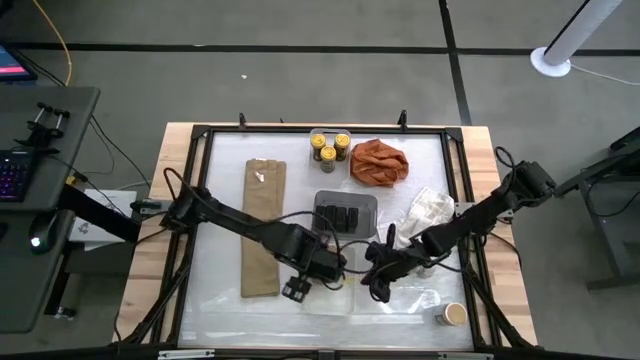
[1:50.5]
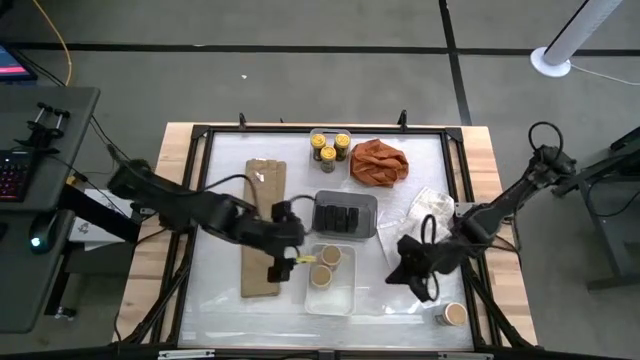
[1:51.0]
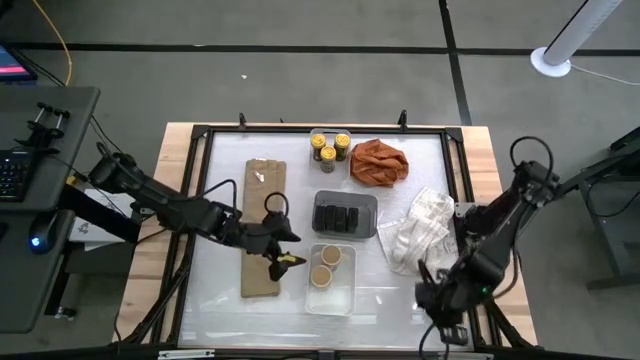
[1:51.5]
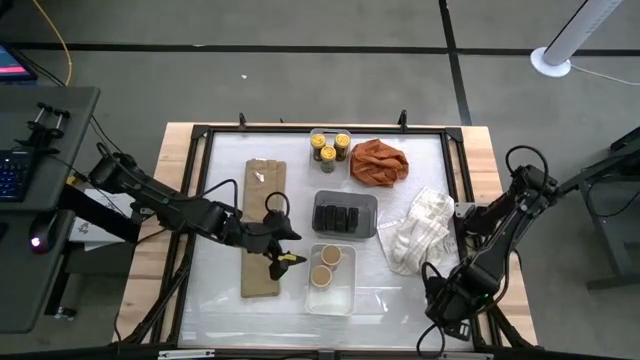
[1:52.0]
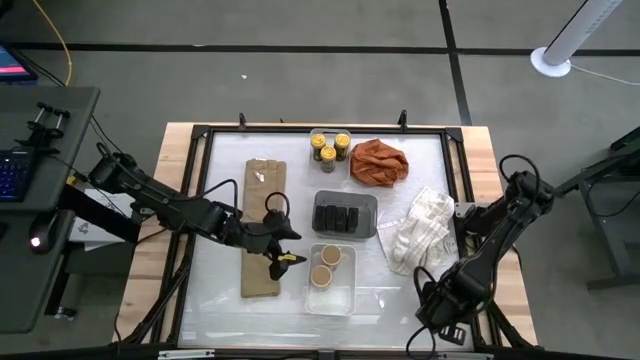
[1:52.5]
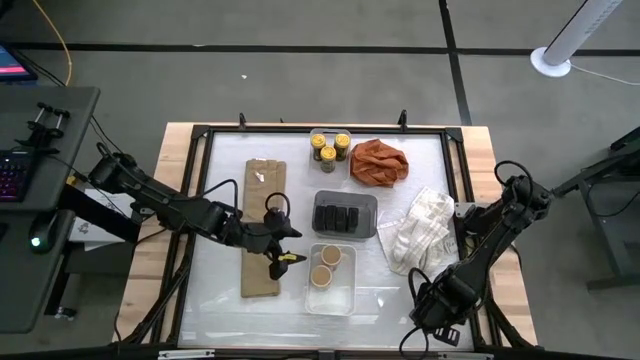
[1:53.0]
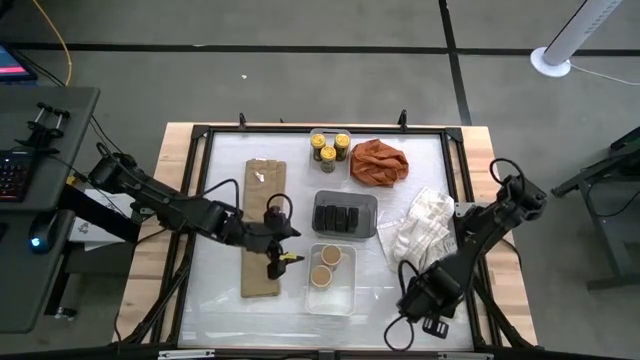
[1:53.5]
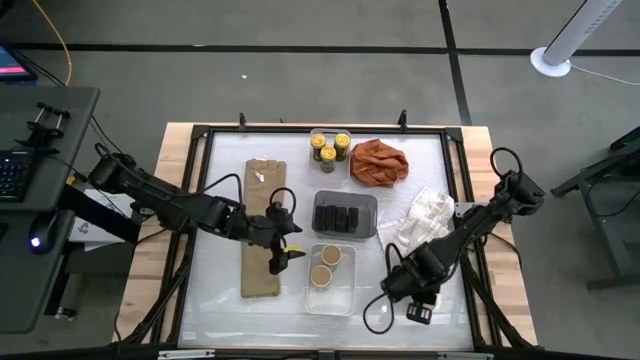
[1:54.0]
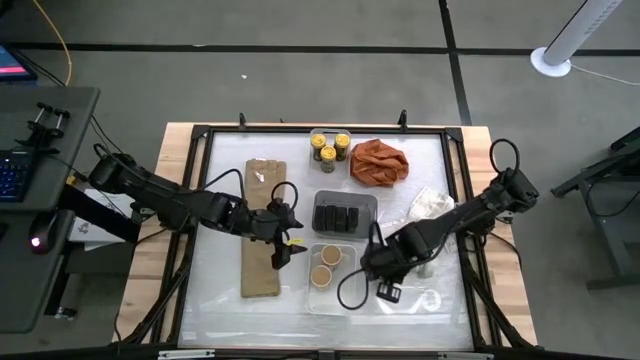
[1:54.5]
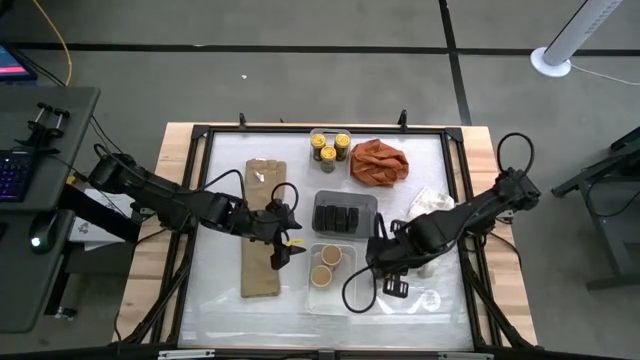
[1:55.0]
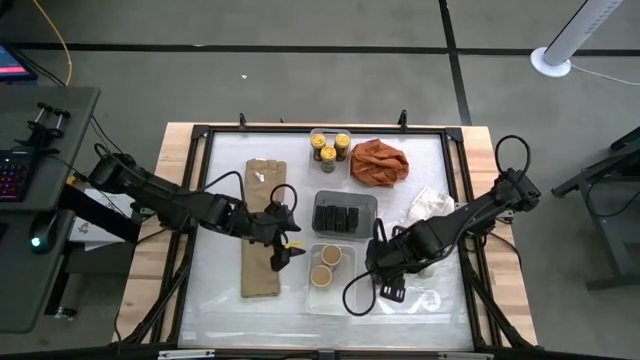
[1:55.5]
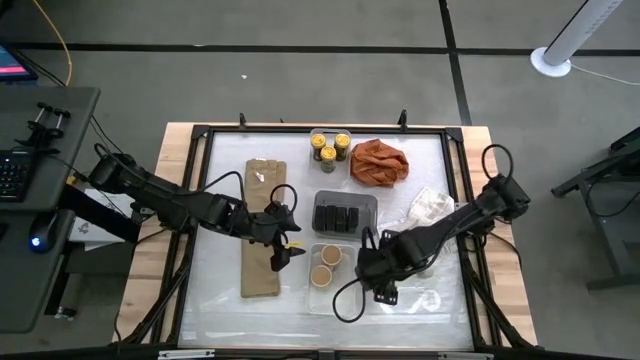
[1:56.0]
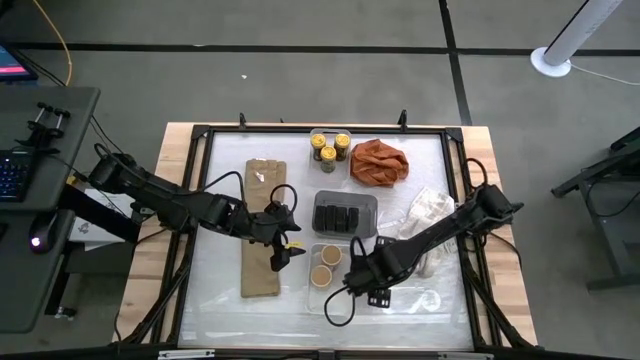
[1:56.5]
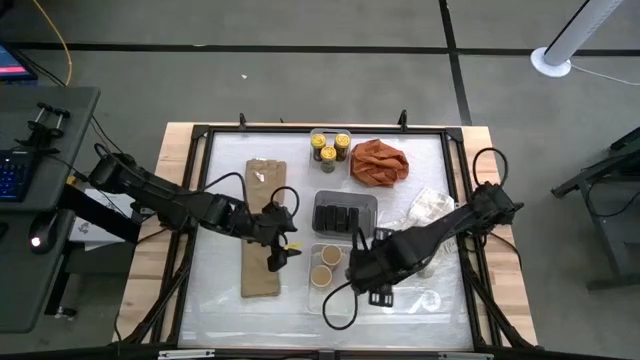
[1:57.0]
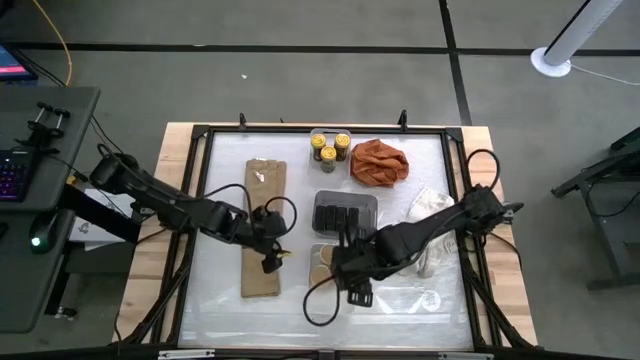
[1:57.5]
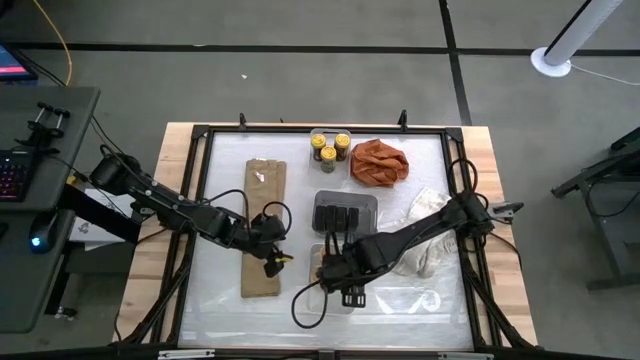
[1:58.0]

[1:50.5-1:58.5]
Task: Sort spices by type
Put the gold seasoning bottle into the white bin

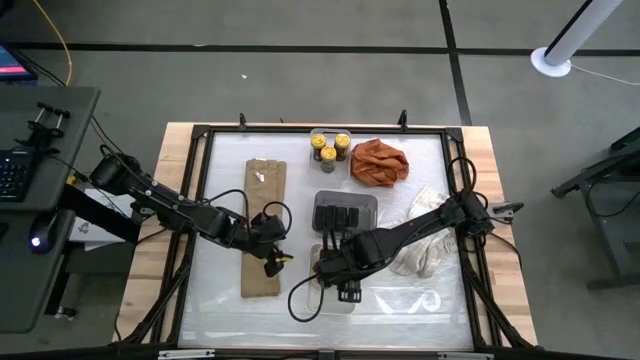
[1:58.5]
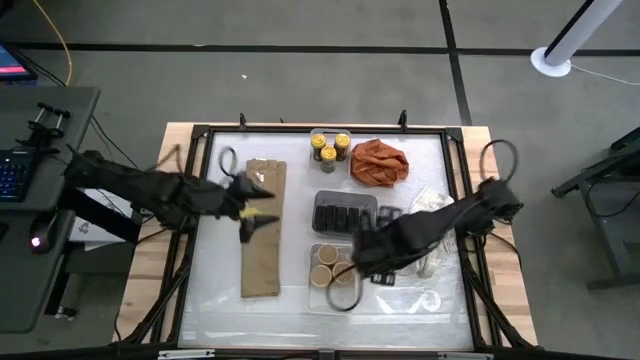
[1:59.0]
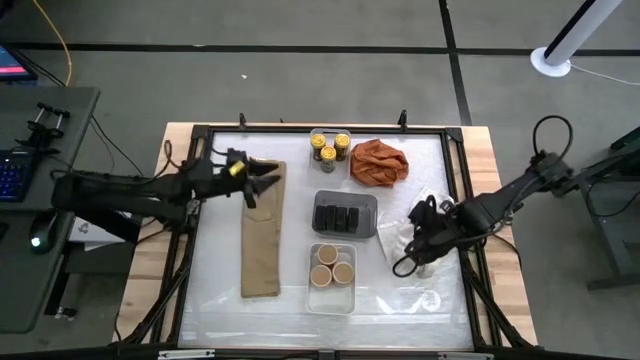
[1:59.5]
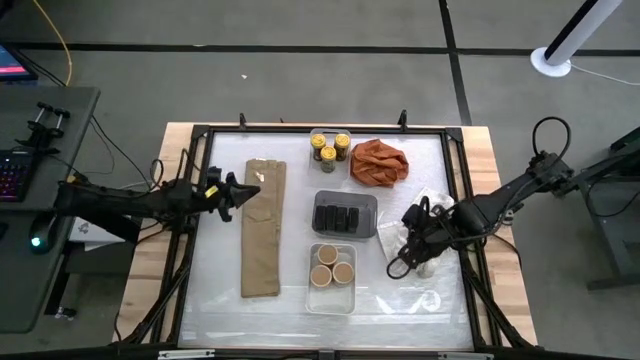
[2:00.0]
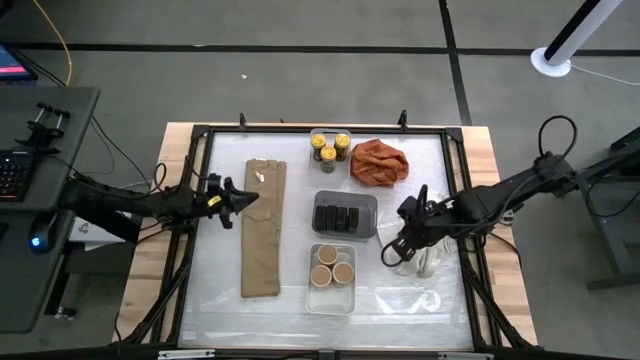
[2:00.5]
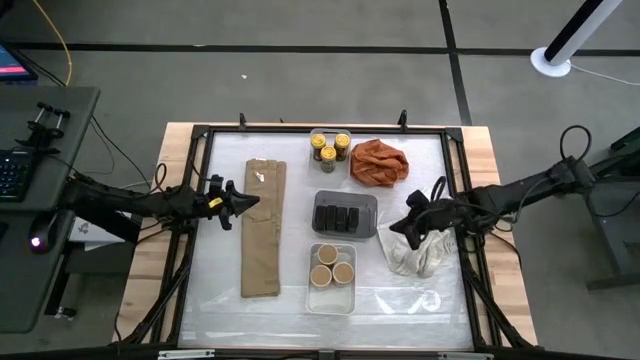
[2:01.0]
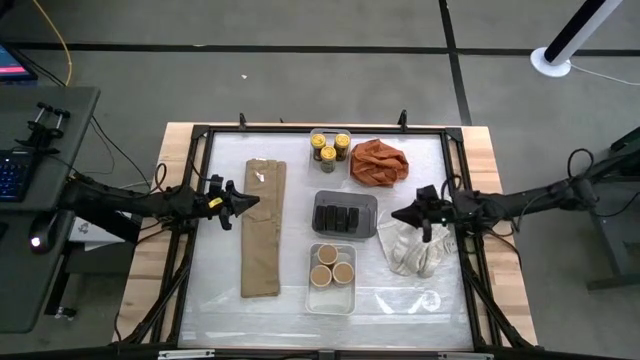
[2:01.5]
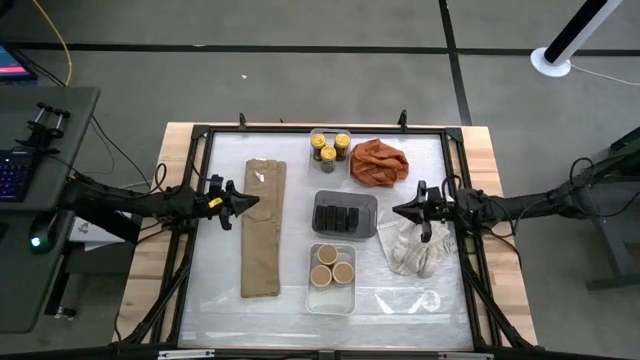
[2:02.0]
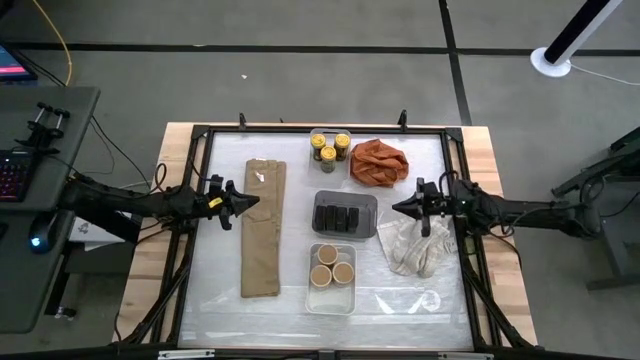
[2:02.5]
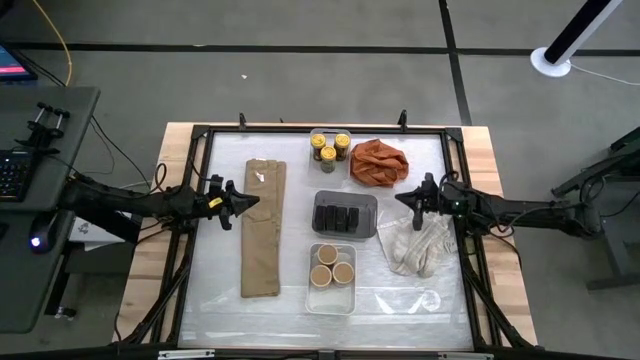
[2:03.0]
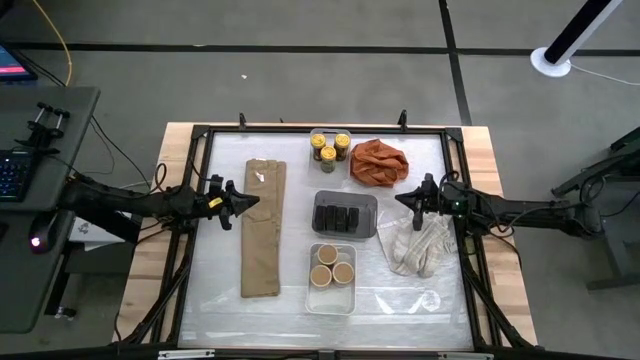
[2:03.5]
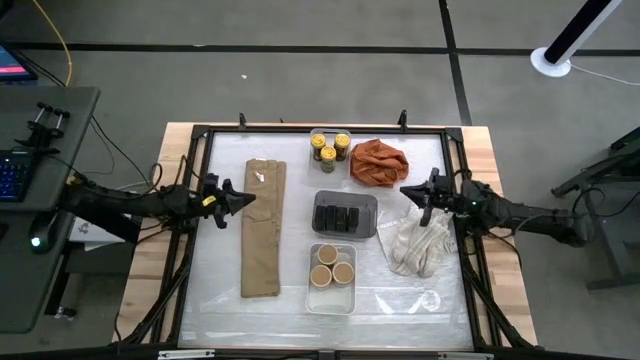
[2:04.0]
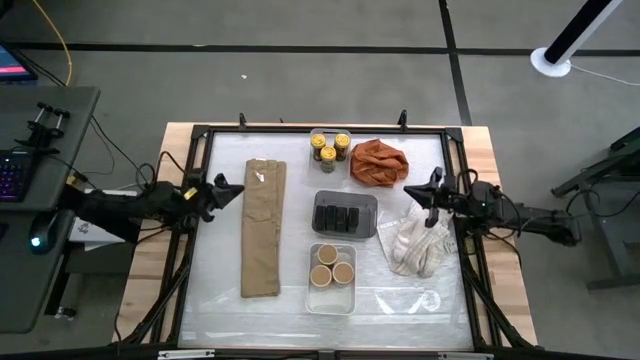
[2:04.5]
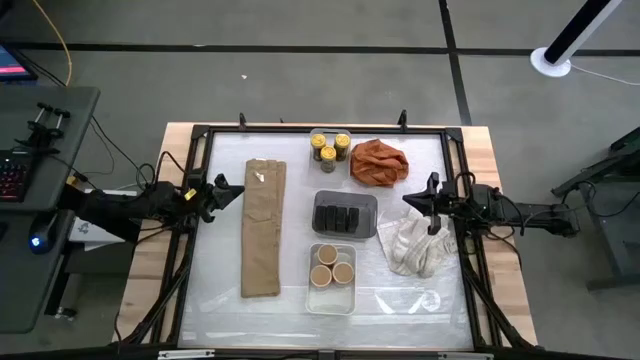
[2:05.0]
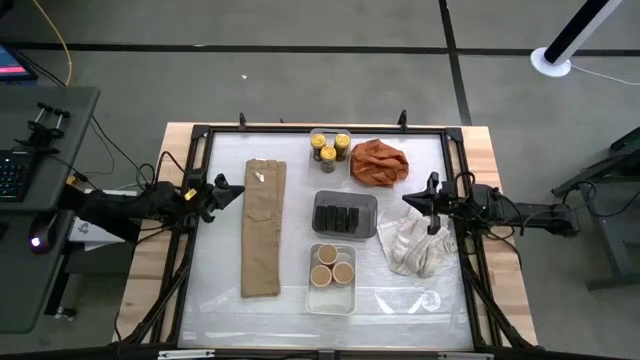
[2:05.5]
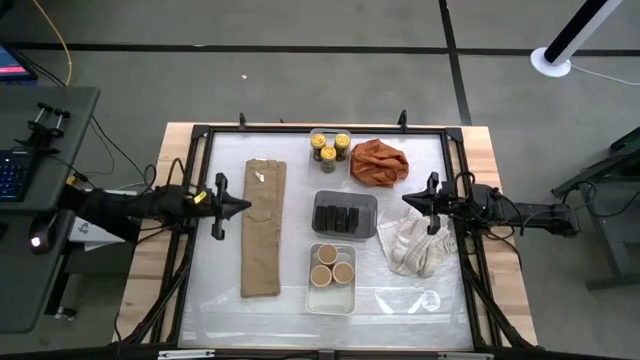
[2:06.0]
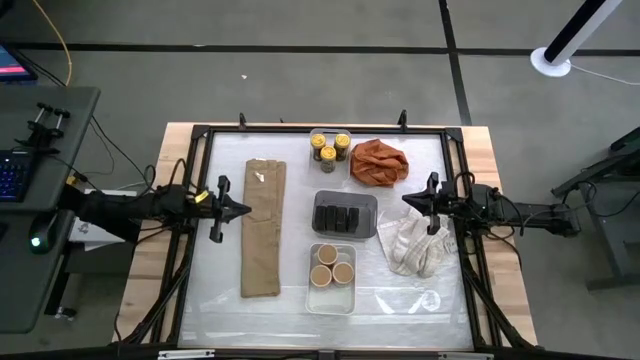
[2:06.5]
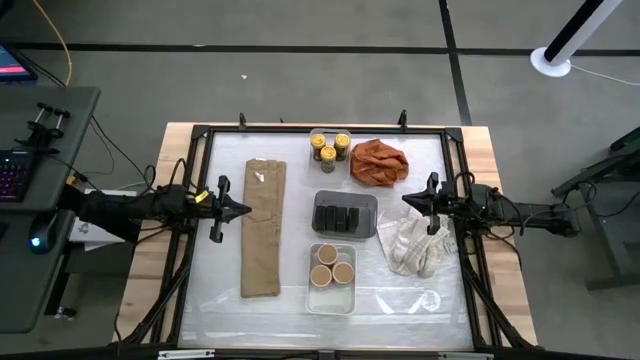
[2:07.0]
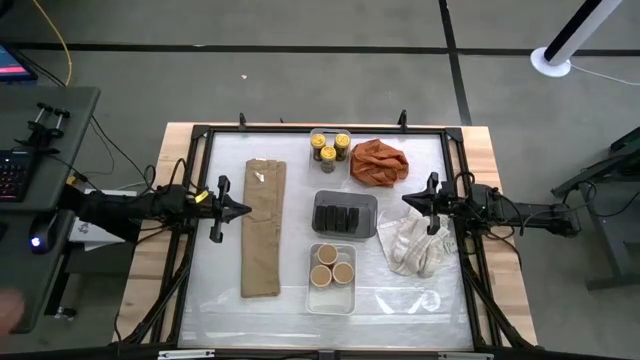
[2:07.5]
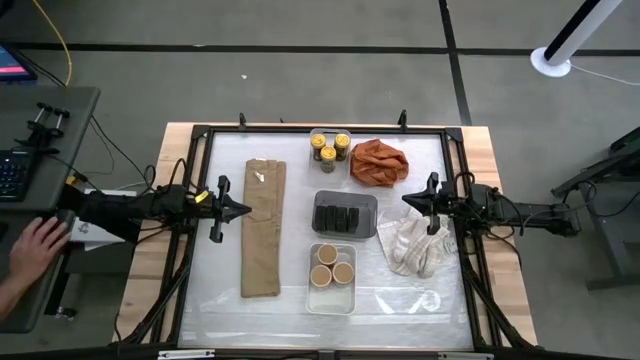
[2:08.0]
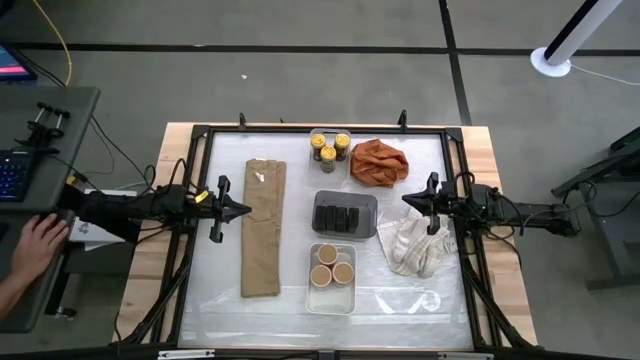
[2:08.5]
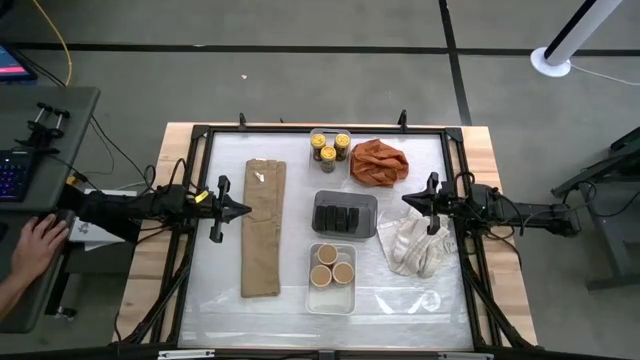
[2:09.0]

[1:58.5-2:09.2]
Return to Home Position

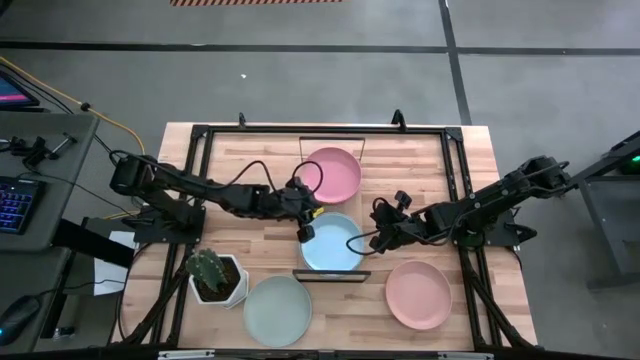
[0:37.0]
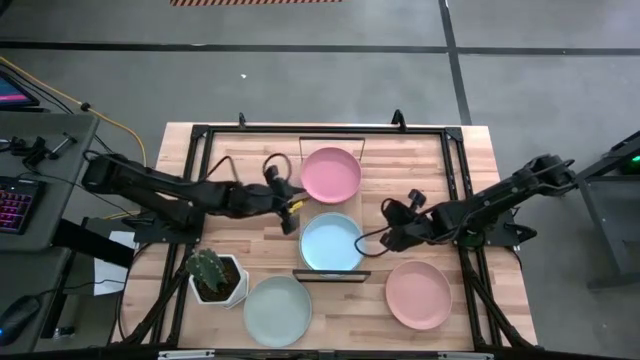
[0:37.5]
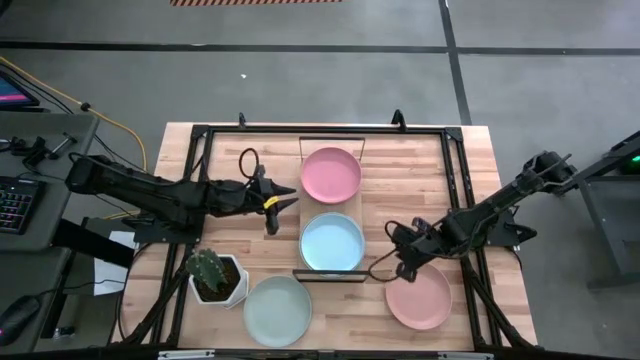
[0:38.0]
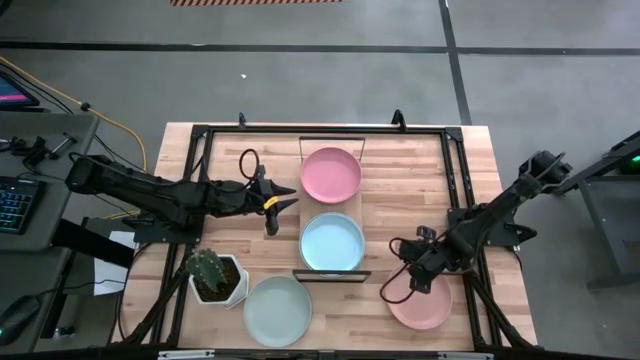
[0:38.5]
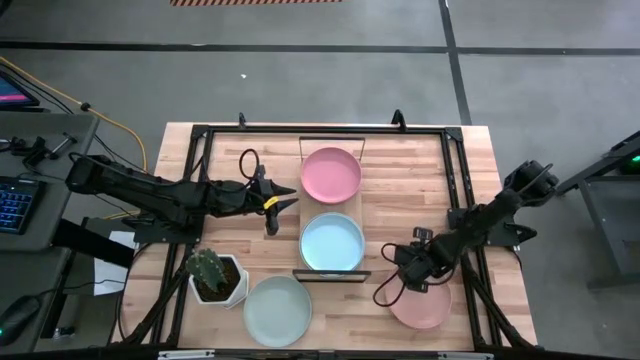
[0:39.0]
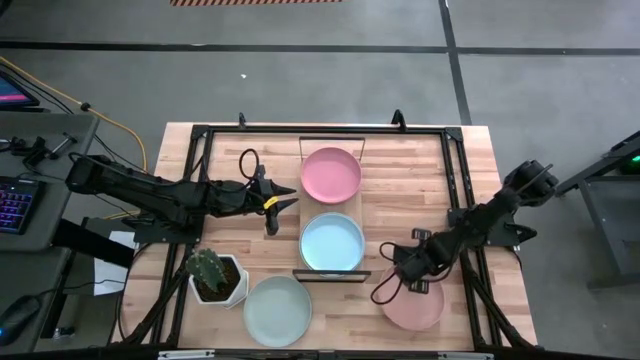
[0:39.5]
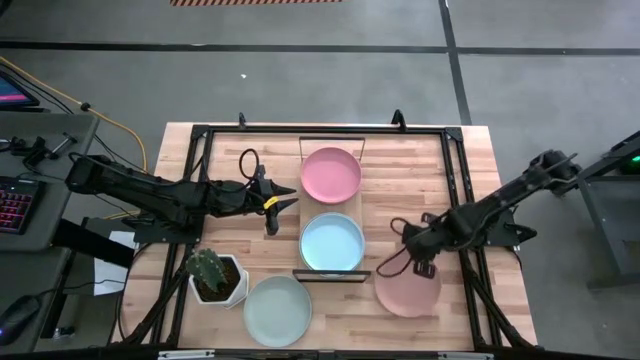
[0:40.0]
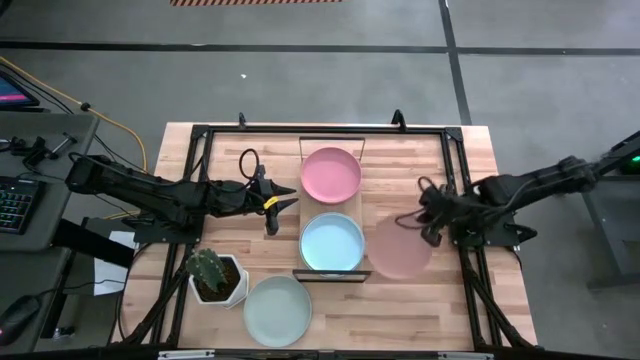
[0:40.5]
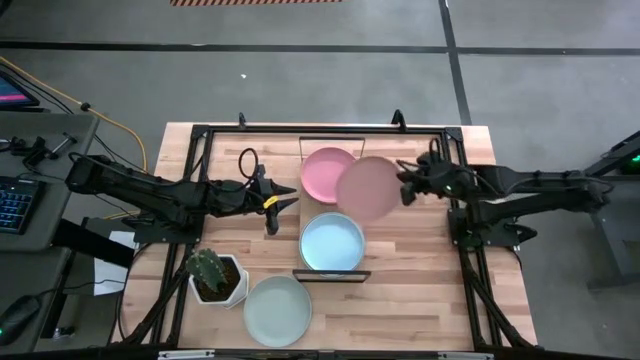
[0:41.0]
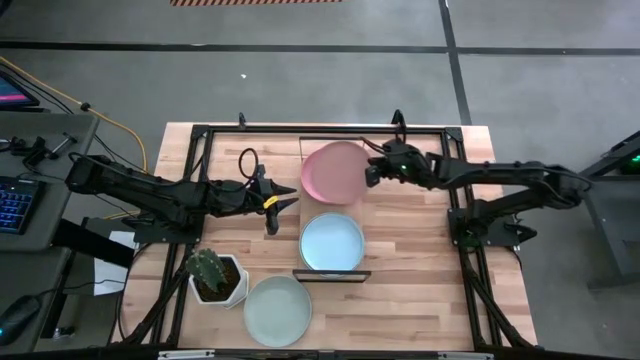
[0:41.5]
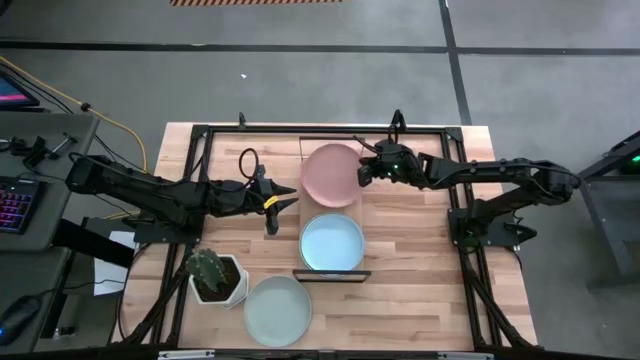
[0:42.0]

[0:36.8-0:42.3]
Task: Place and stack plates onto a shelf
Stack the light pink plate on top of the pink plate on the shelf
